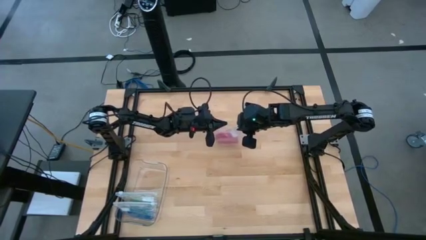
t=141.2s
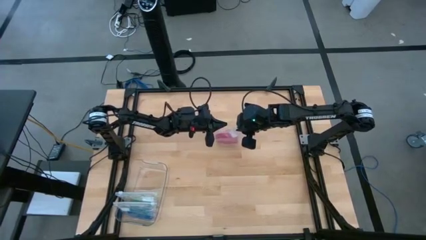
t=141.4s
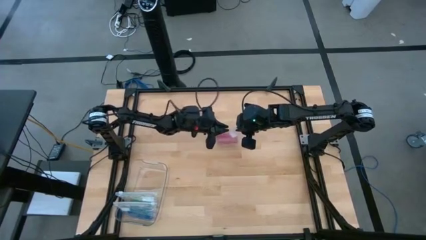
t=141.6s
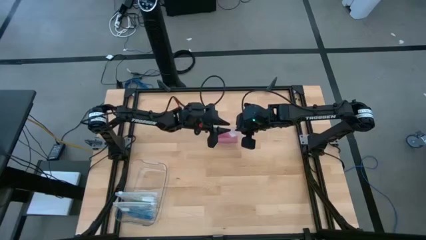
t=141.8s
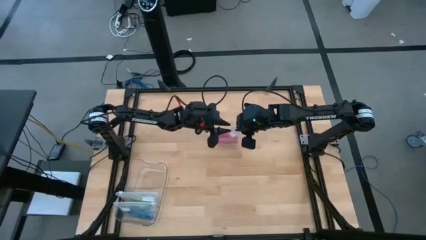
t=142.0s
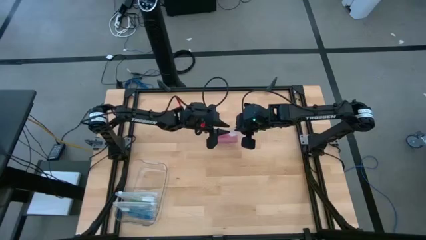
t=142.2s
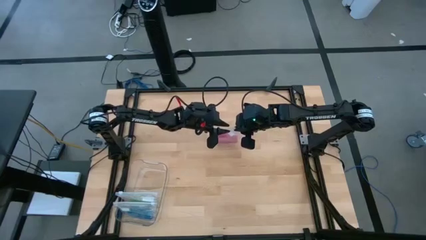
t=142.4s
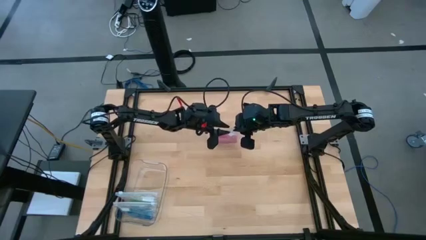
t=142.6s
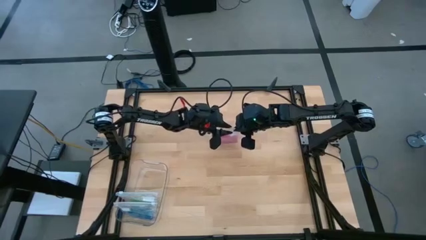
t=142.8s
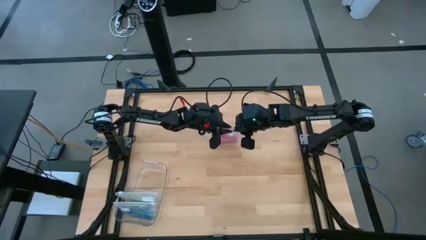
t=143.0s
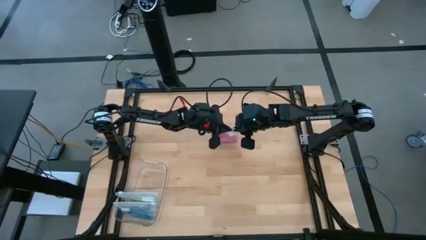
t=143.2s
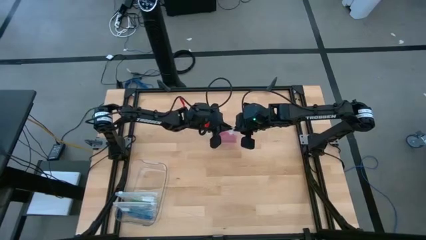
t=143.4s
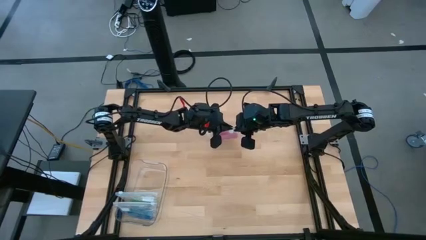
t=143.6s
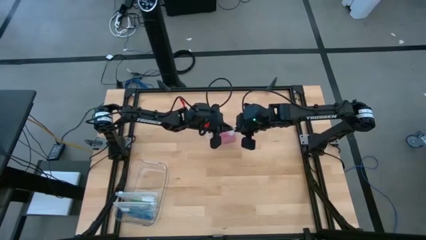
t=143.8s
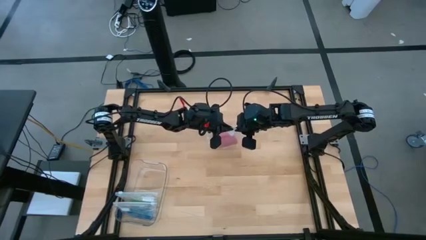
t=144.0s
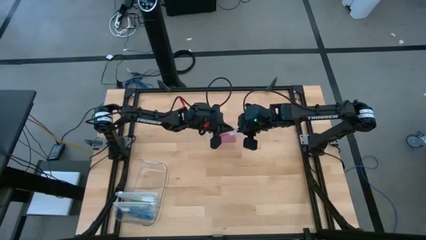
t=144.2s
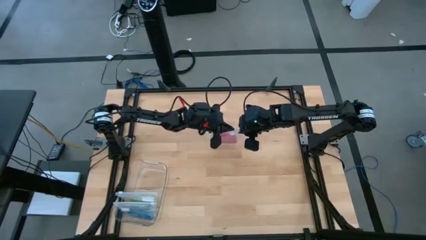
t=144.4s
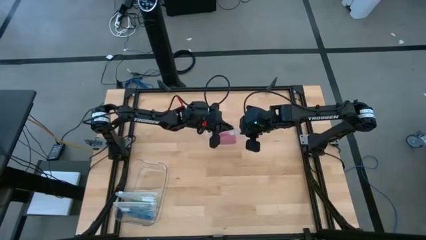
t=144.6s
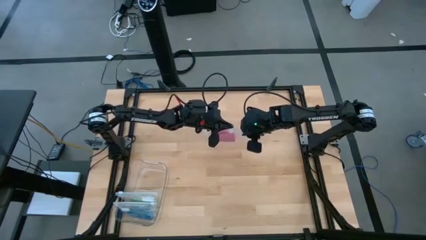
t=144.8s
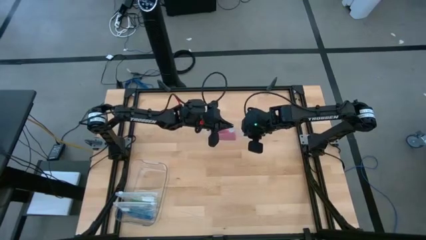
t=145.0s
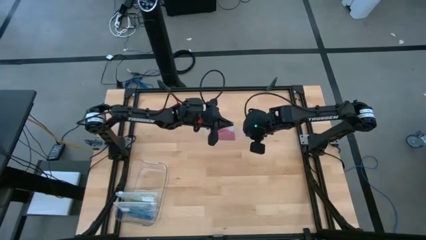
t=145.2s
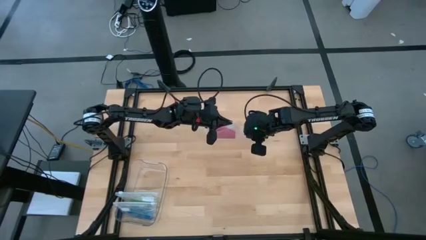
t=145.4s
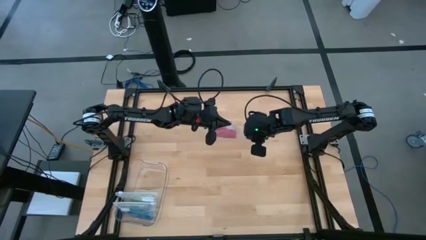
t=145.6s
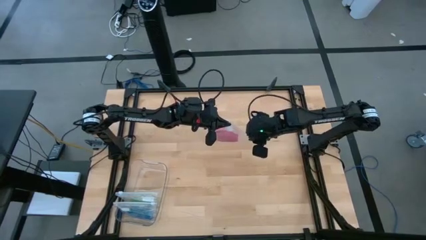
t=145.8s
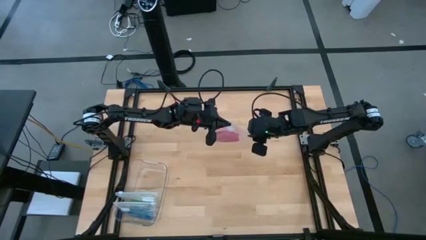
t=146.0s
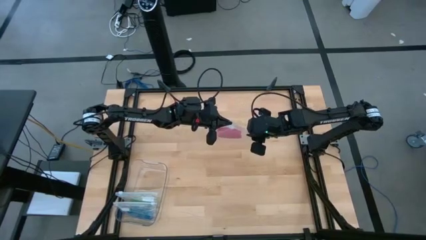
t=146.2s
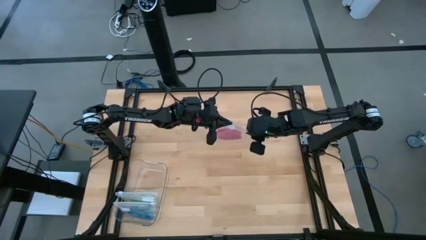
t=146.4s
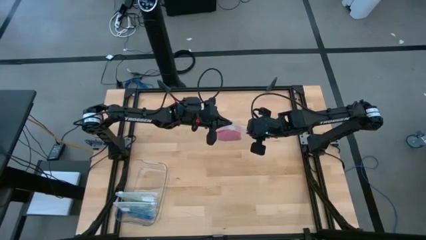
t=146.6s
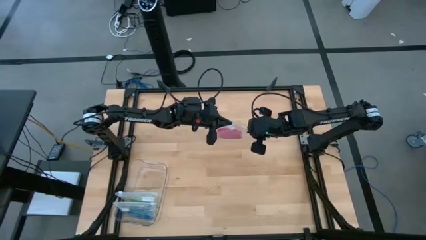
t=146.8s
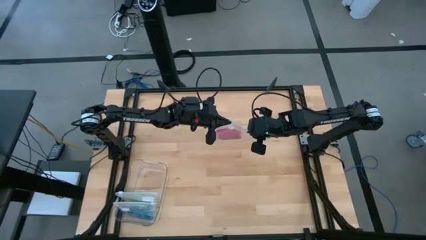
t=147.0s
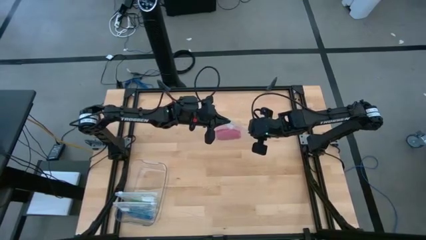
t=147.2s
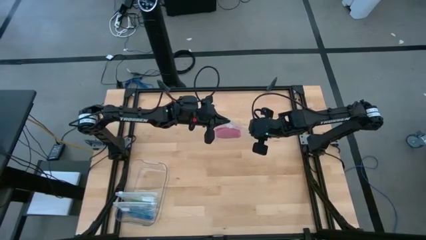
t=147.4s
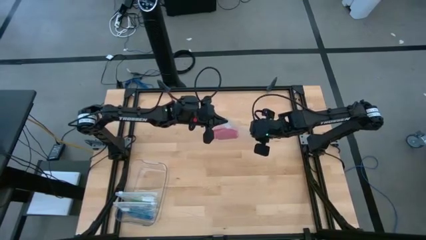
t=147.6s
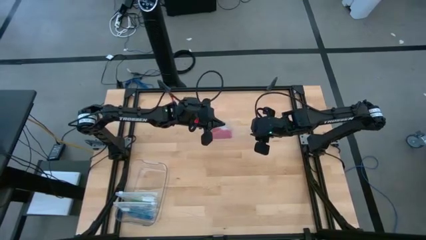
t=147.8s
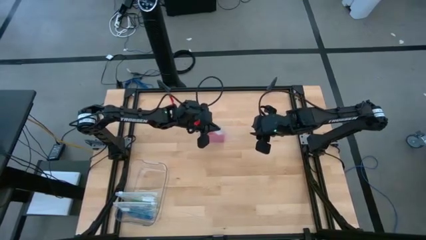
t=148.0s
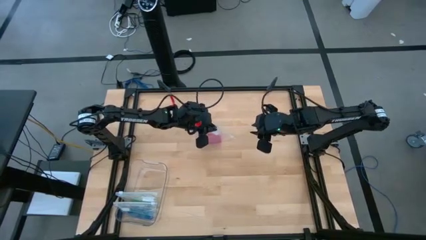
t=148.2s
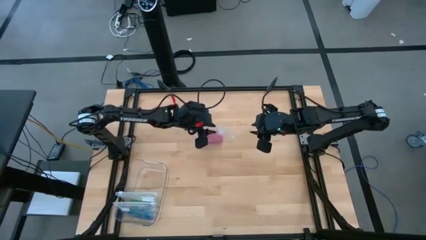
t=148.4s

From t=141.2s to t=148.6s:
Task: Roll bandage
Close the transparent zip bag

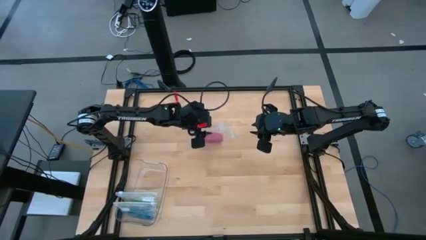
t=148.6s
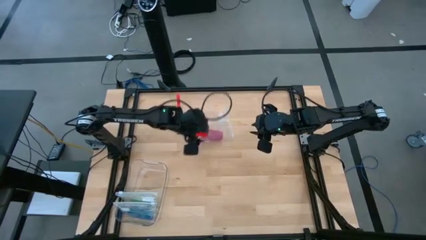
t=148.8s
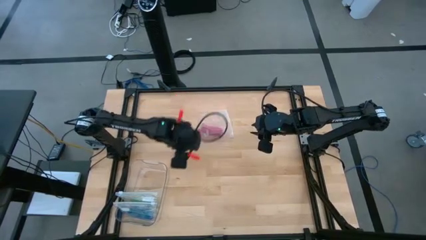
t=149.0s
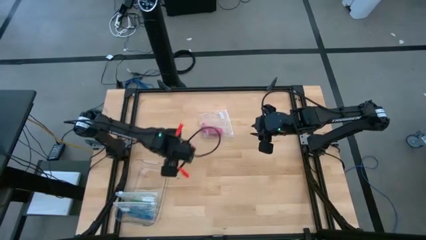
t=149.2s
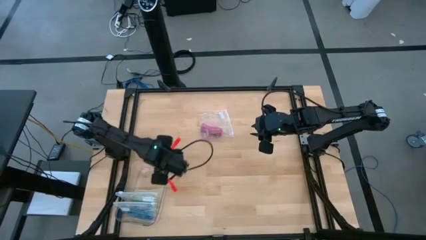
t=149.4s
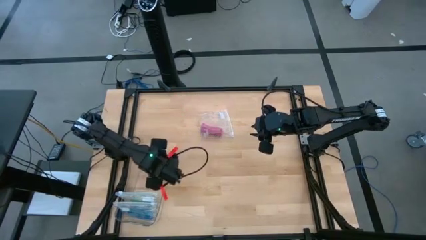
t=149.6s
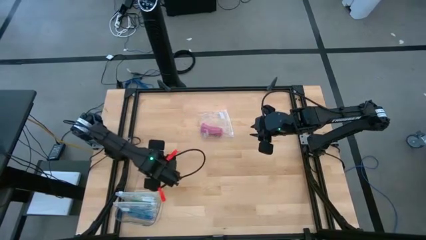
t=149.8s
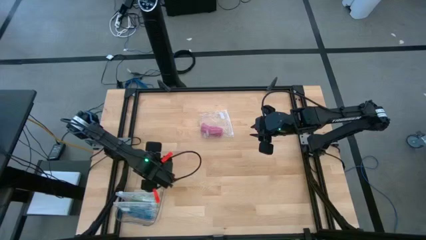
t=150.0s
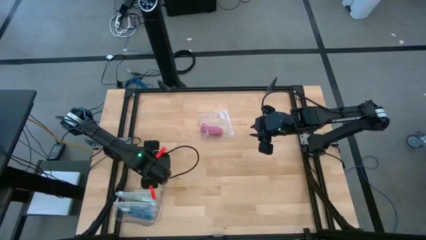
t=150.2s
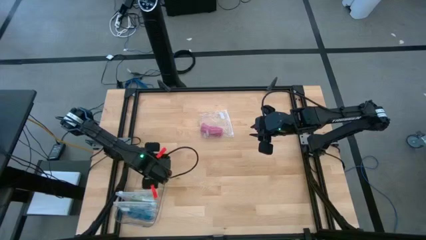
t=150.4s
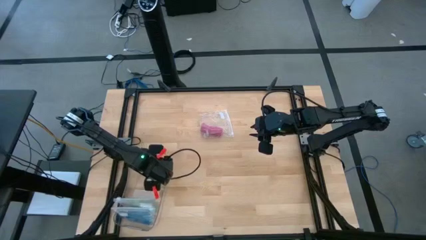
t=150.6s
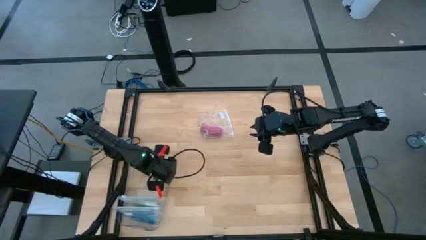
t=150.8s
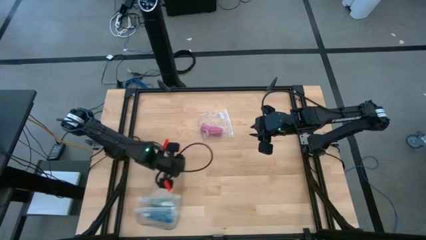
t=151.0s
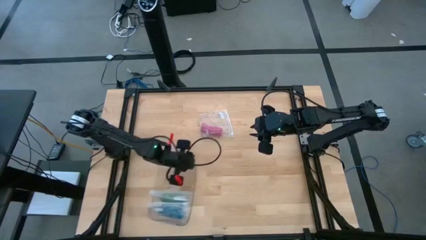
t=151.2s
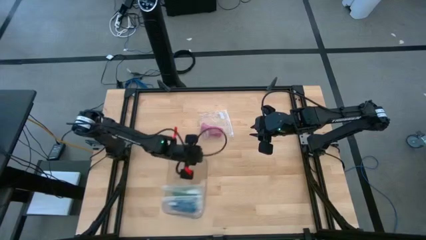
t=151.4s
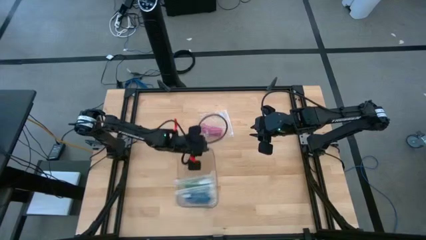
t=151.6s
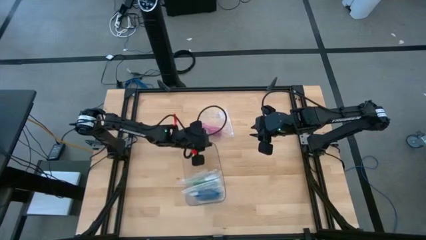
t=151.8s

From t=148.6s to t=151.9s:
Move the transparent bin to the bottom center of the table

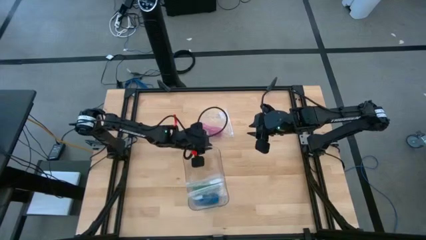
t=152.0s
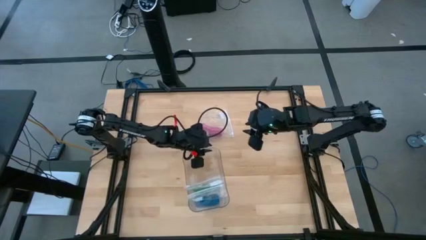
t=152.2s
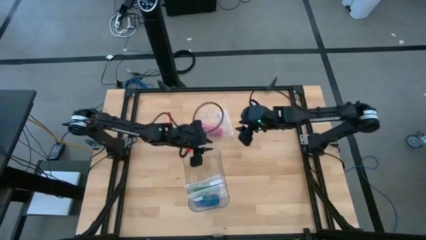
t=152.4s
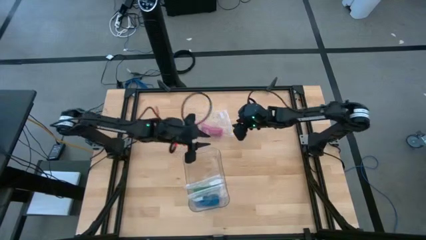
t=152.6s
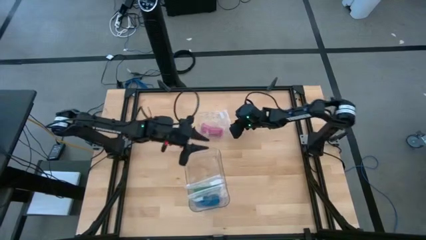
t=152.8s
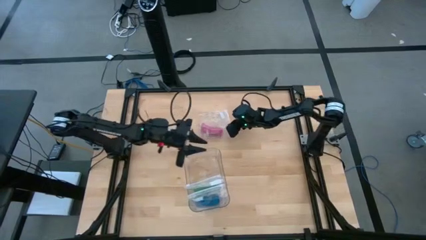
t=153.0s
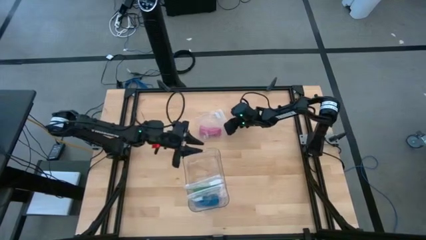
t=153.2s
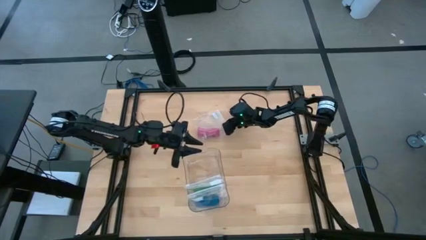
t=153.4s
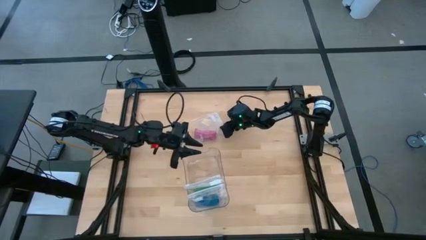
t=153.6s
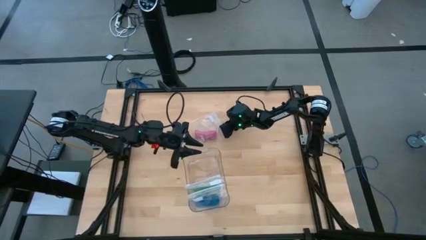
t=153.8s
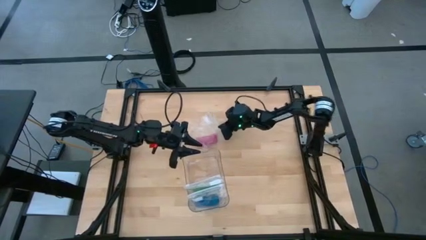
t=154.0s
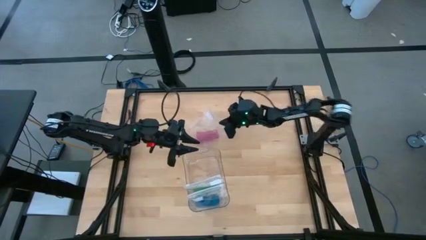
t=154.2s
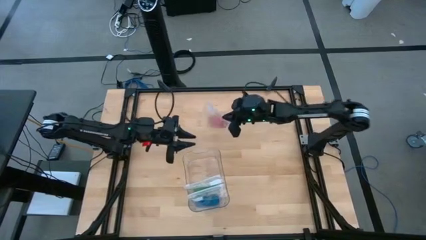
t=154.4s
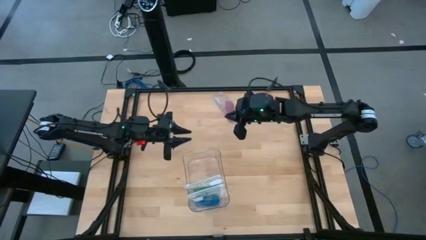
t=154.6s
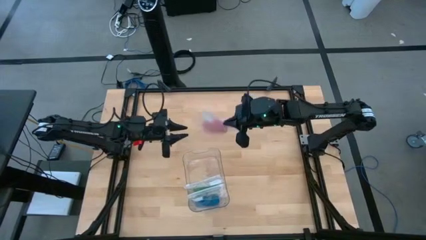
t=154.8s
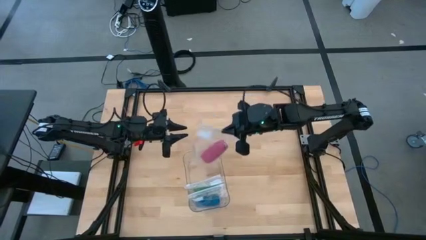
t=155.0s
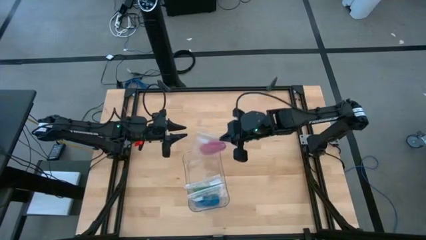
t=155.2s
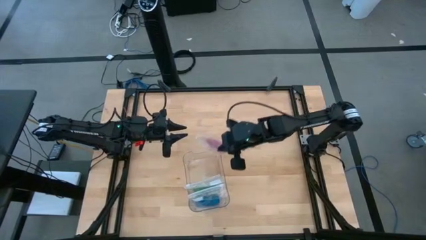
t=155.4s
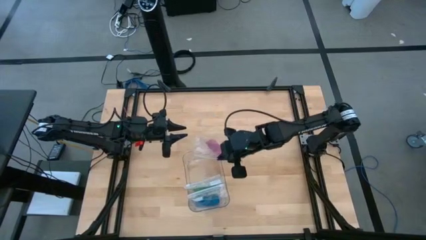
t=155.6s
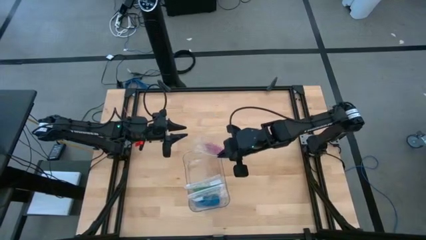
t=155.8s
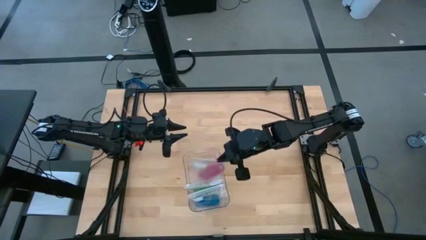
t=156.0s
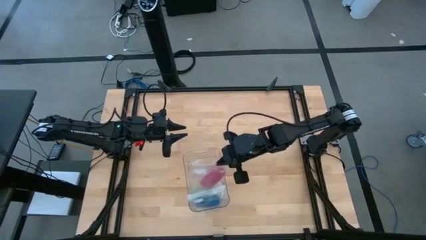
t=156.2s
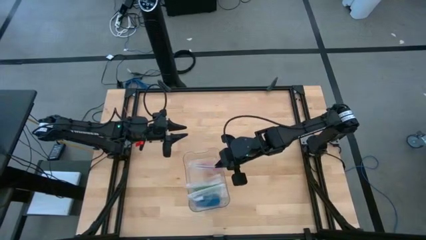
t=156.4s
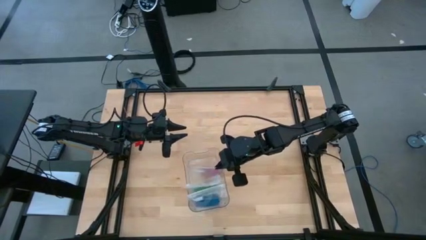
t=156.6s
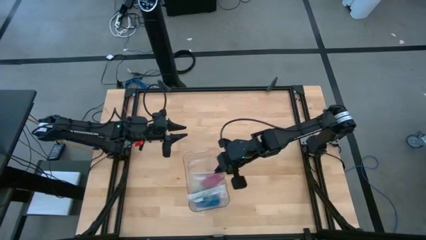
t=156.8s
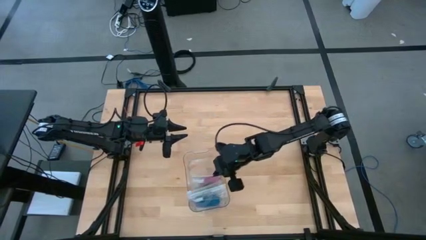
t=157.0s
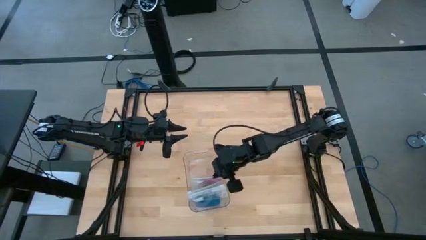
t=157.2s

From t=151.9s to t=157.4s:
Put the packed rolled pink bandage into the transparent bin
